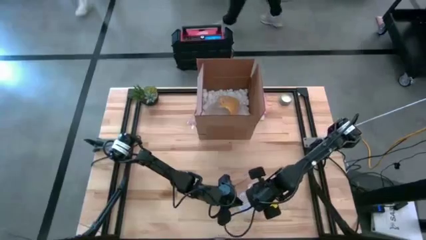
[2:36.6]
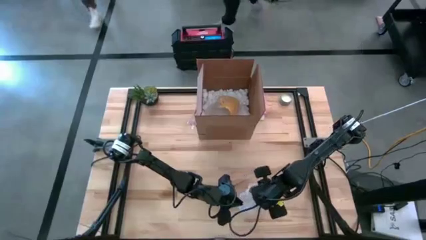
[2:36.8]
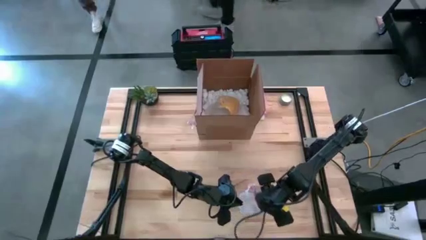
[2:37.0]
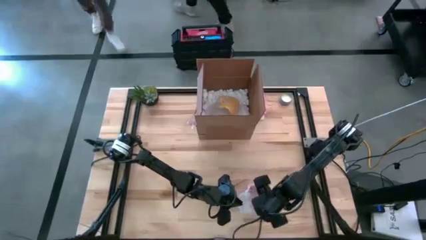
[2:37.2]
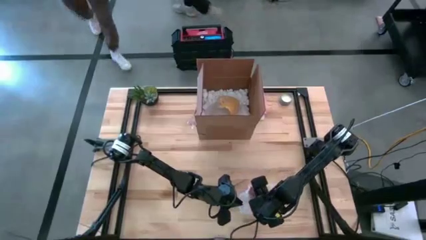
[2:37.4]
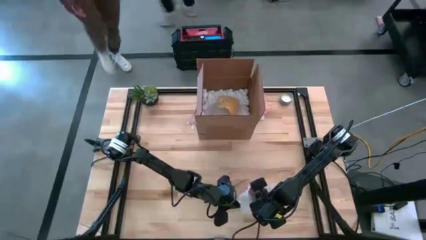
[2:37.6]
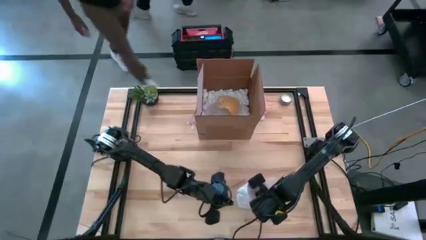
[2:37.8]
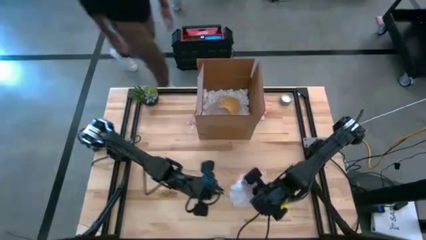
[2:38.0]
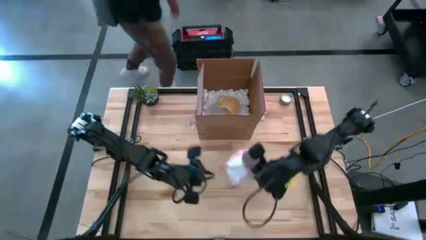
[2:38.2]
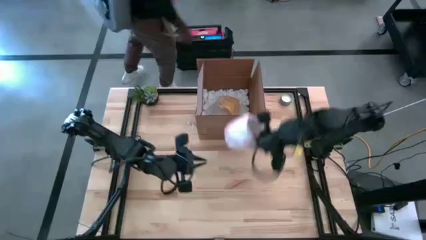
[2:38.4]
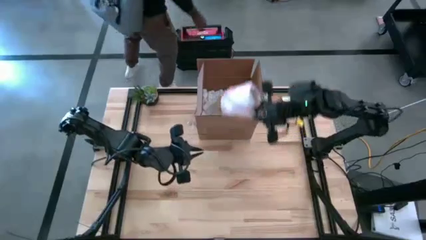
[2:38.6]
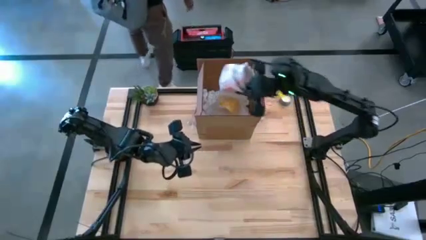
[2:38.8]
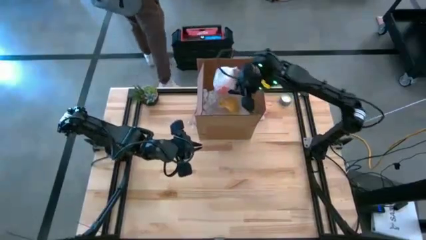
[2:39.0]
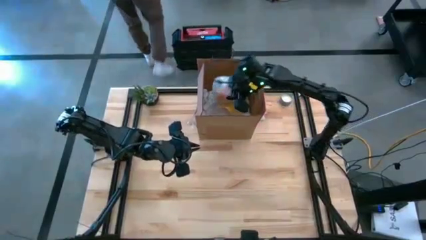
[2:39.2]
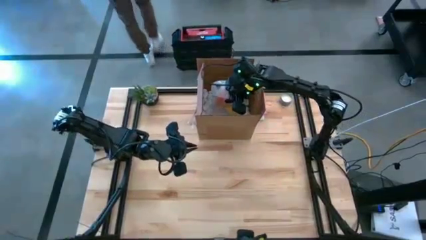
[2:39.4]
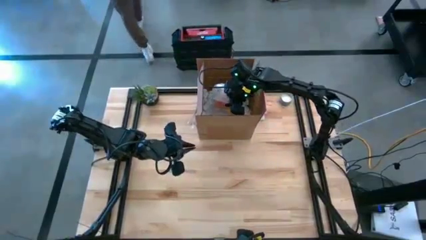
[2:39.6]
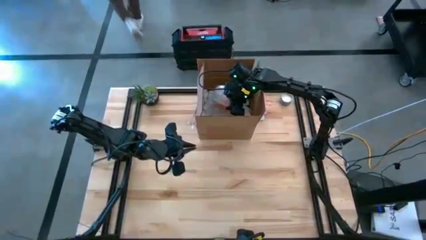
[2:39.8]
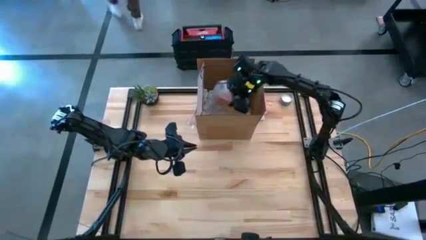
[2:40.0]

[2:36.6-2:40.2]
Task: wrap mug
Put the wrapped orange mug into the cardboard box

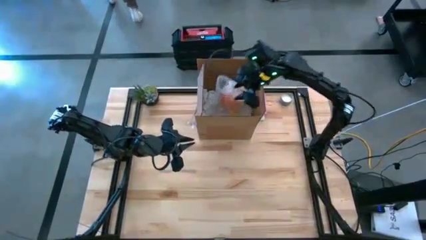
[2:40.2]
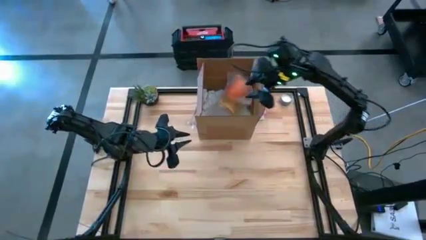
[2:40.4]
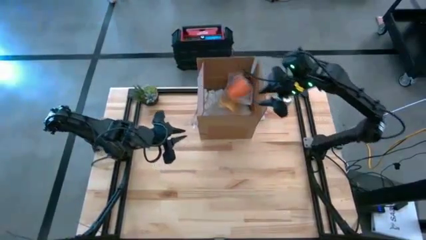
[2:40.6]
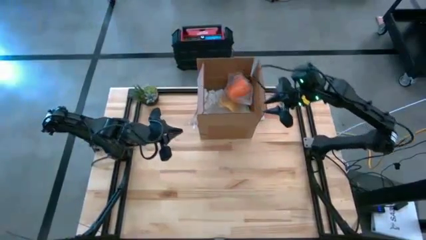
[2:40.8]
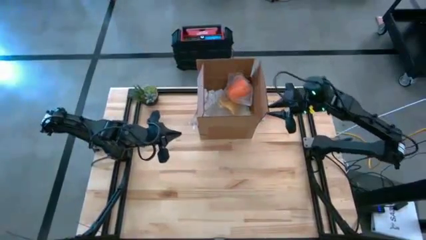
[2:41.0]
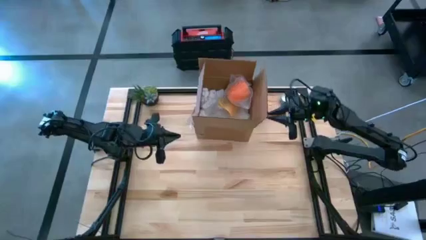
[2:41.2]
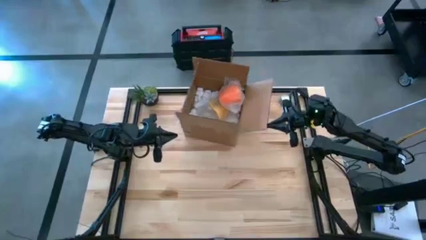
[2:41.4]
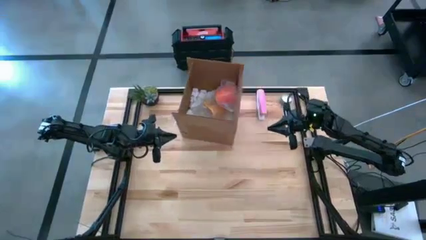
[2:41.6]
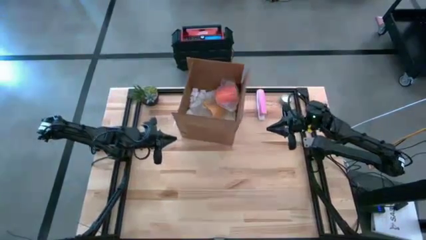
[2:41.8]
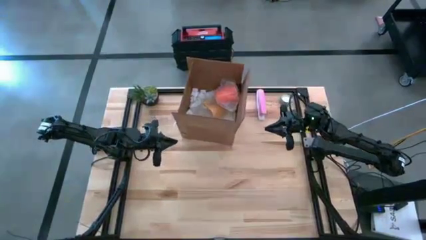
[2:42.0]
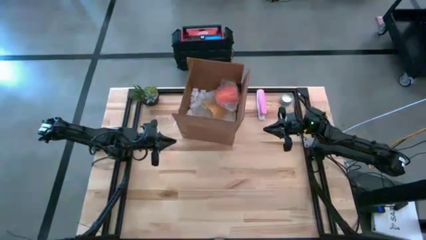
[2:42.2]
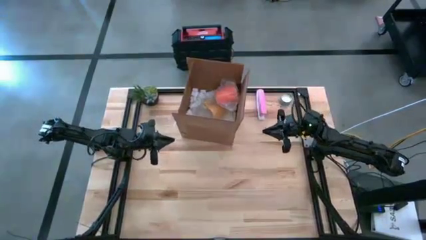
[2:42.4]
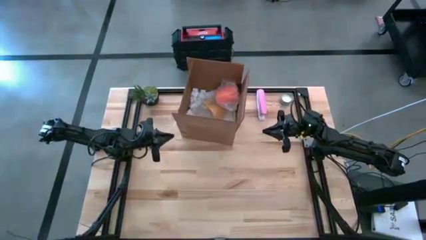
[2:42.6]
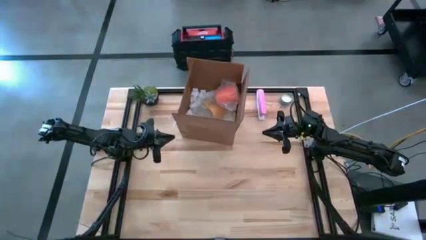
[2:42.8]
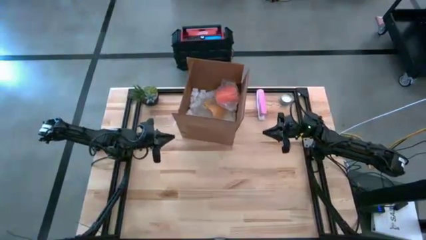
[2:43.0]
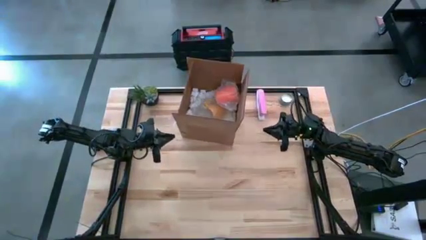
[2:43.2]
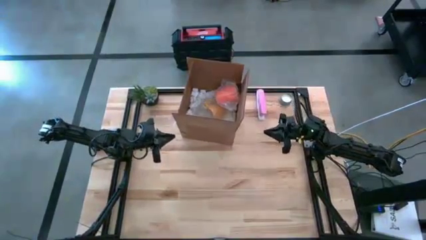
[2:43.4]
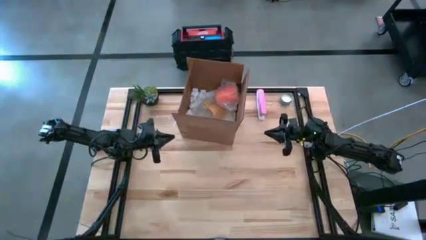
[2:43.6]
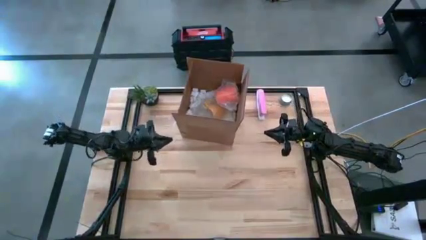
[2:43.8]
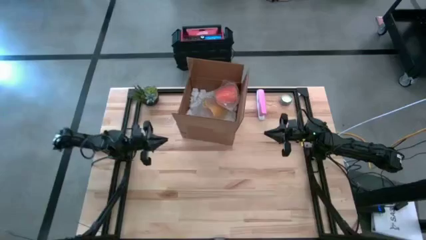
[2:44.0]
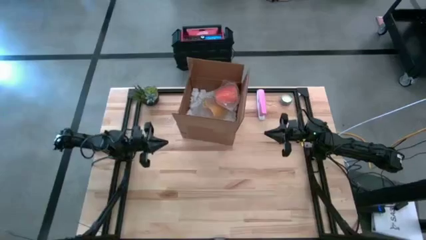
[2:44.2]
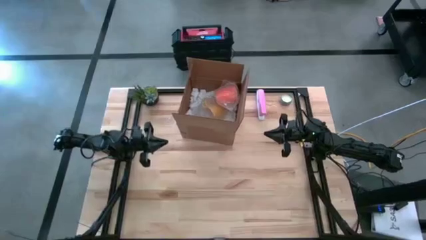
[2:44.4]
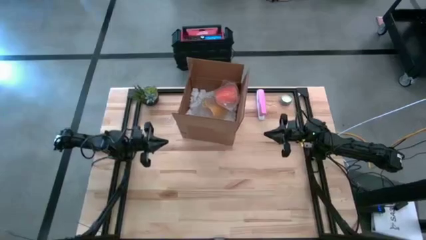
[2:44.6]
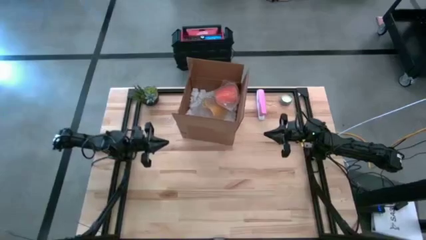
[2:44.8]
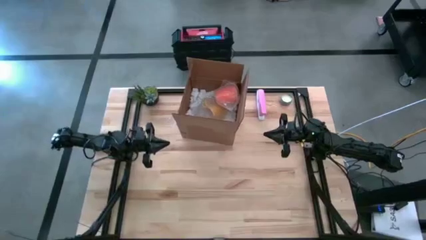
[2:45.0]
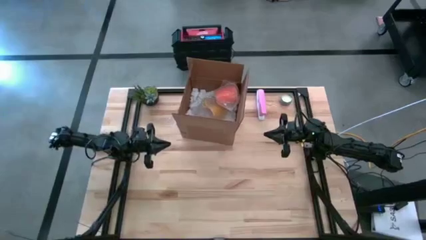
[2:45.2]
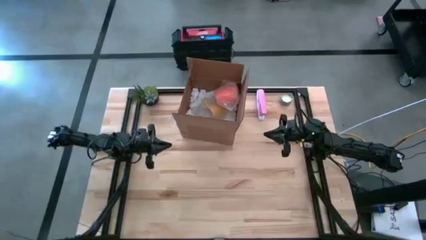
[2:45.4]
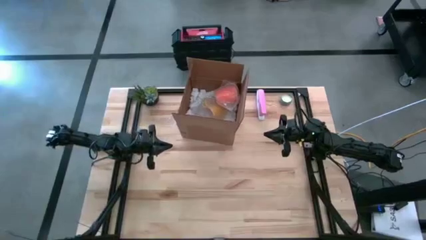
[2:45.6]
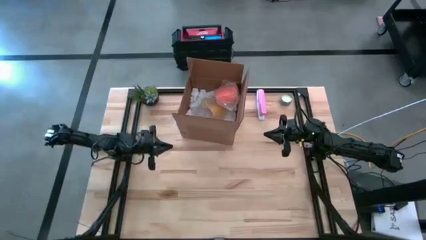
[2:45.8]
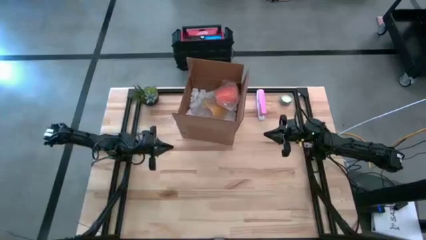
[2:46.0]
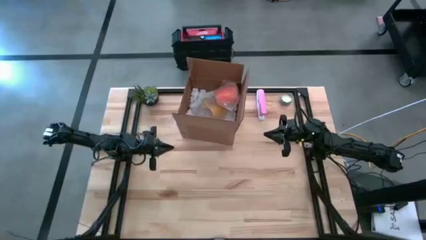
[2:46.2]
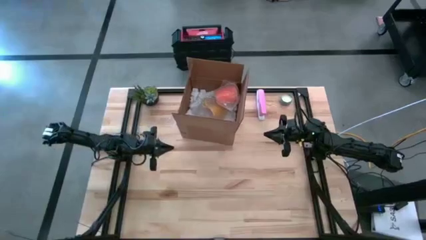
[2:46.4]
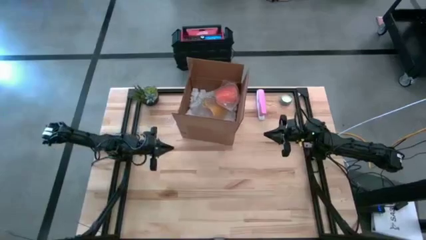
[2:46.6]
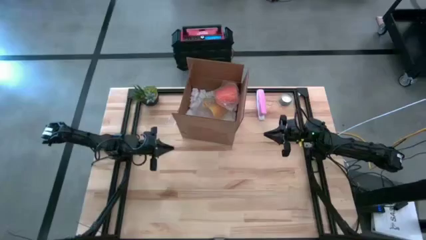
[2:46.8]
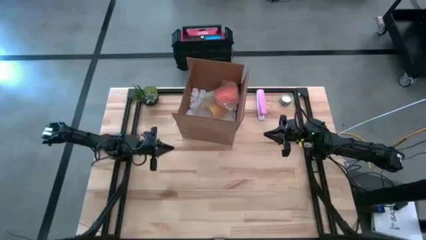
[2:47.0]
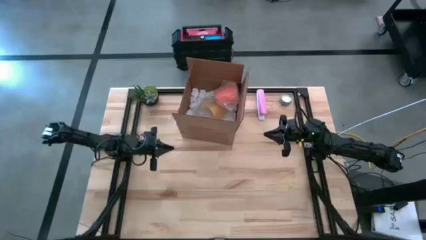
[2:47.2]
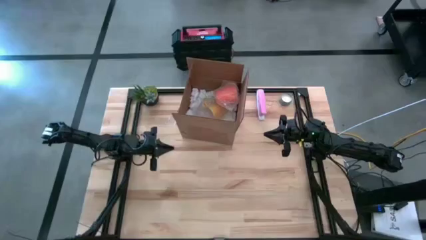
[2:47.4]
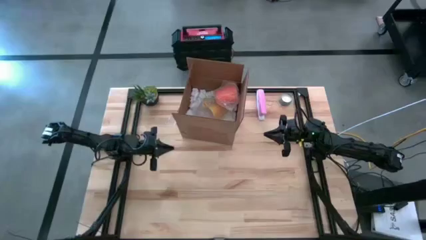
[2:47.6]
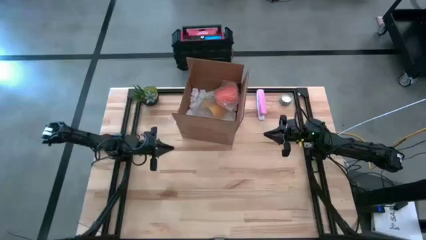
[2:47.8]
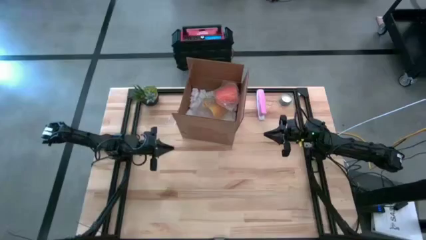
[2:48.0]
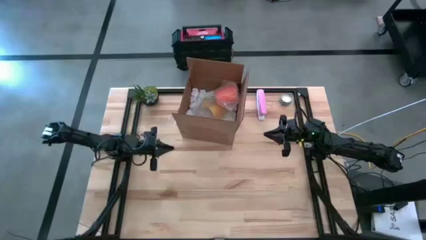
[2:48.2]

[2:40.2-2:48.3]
Return to Home Position

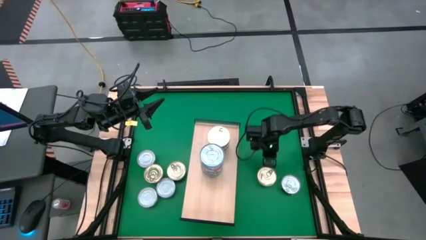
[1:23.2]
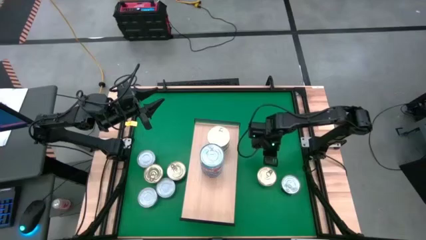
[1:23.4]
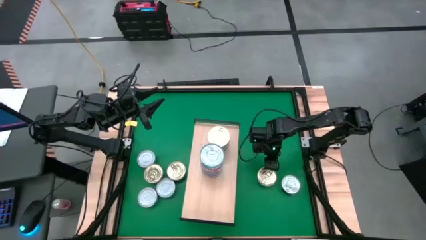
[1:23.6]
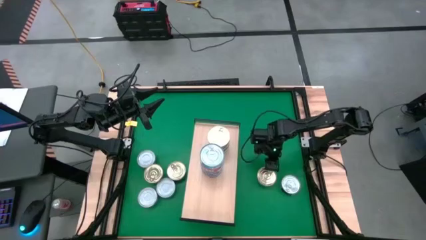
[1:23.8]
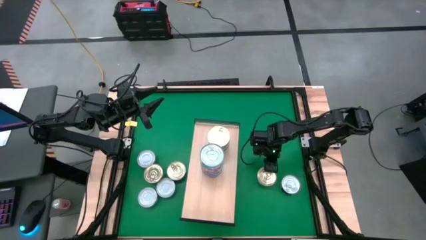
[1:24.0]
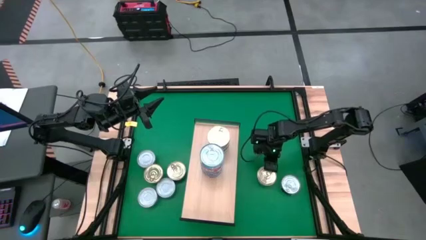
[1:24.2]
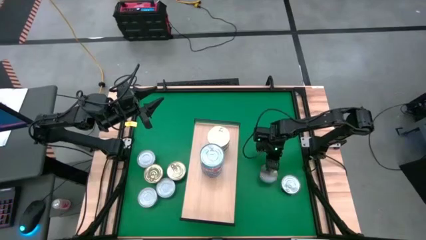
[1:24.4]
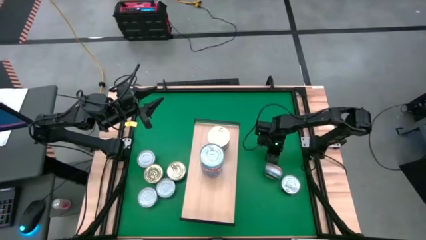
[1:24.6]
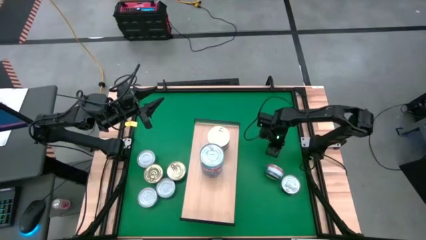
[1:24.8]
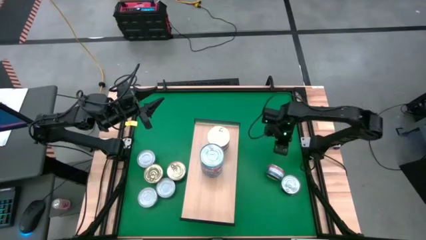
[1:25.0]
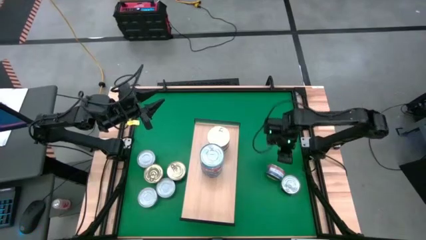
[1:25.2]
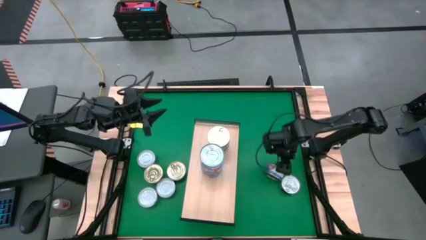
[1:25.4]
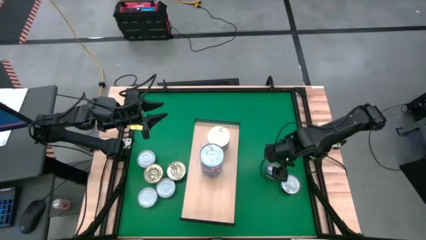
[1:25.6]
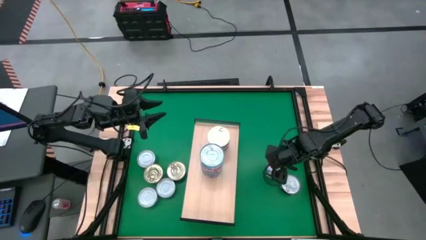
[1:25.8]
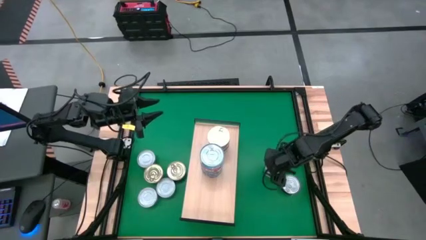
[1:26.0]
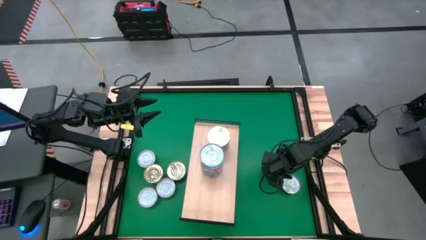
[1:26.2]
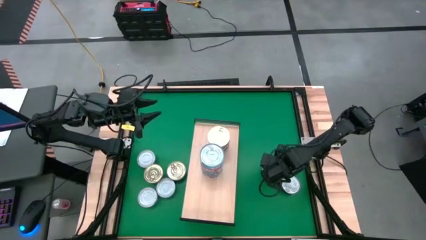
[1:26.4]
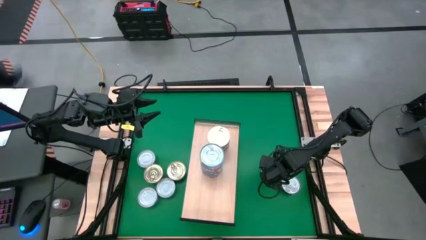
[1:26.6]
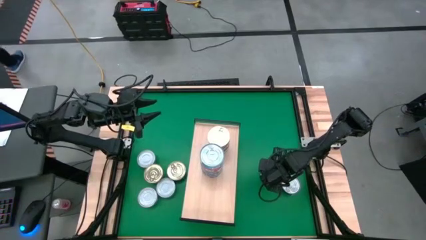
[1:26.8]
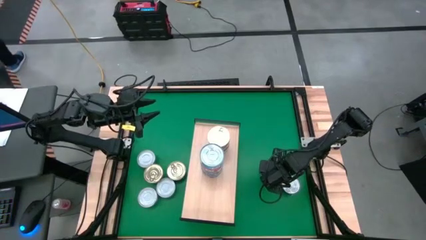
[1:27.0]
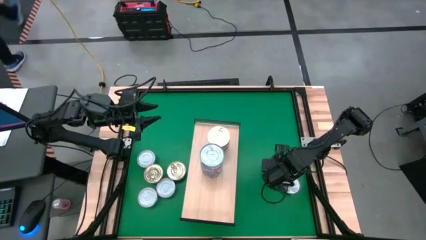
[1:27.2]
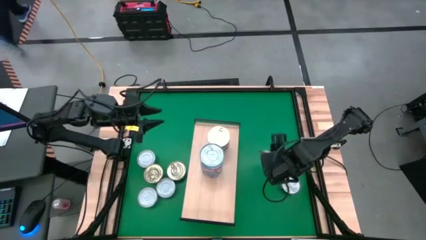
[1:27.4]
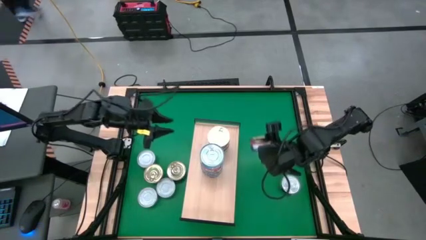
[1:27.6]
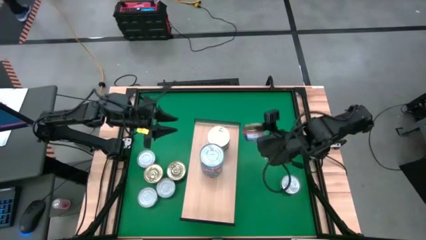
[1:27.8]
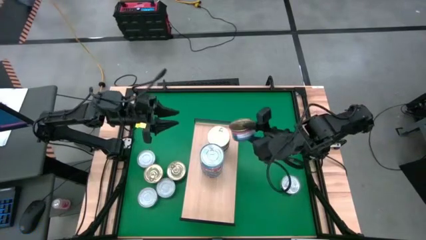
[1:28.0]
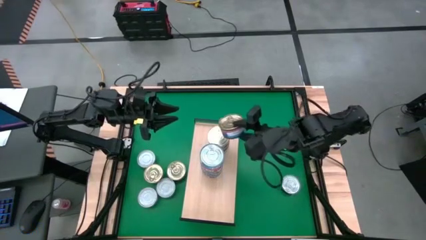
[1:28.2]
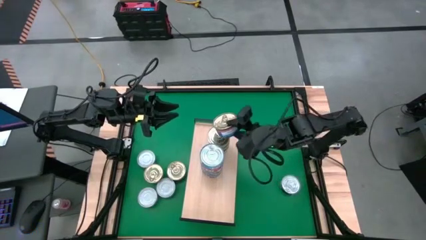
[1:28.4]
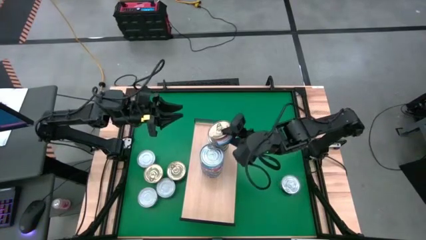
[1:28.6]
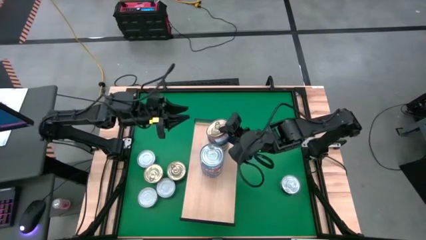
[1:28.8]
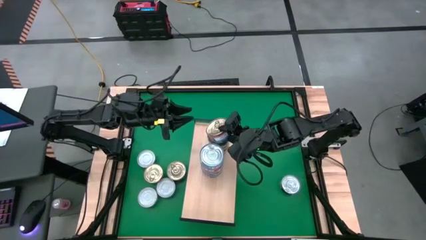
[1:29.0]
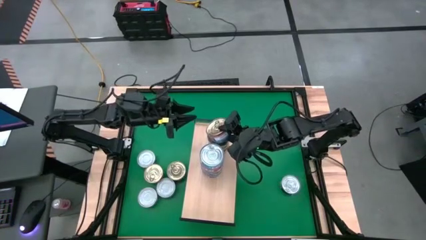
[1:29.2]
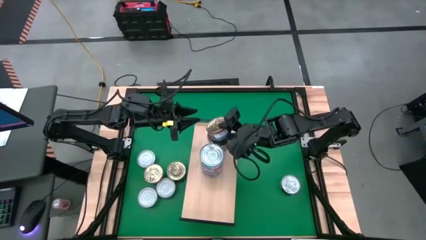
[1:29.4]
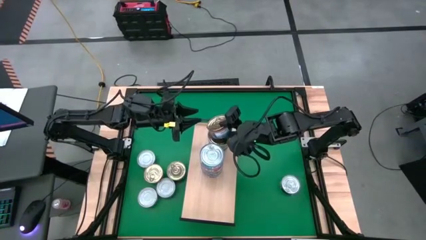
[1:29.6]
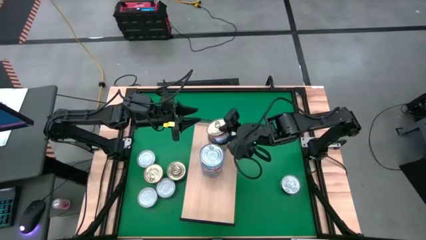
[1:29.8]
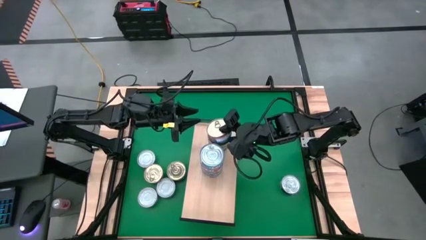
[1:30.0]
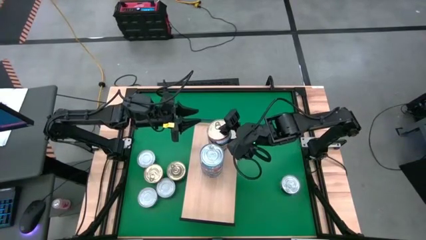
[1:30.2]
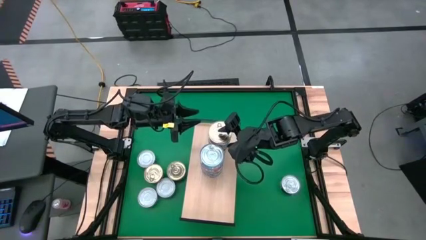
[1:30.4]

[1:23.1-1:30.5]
Task: Stack canned seafood by type on shelf
Stack the blue pink tuna can on top of the other blue pink tuna cans on the shelf
